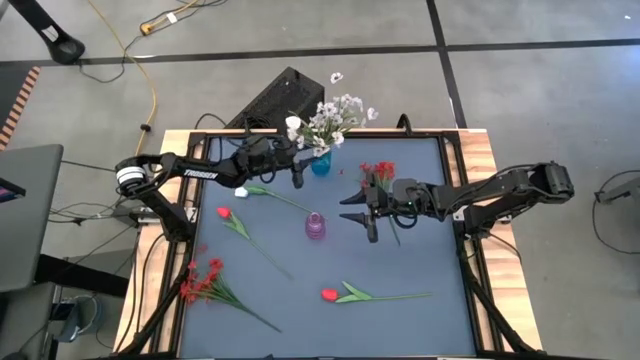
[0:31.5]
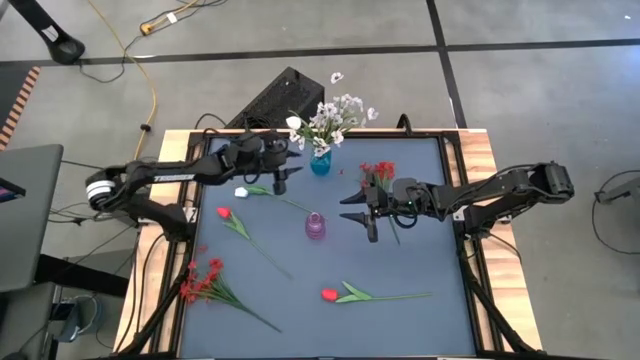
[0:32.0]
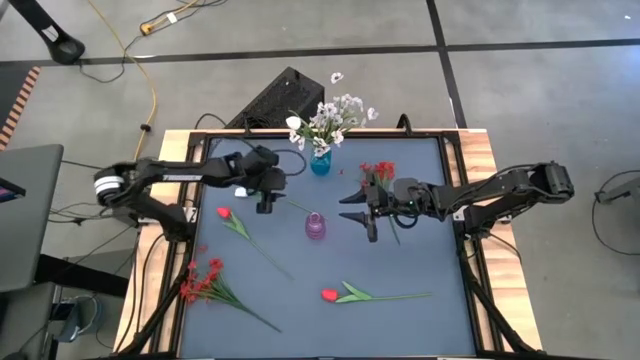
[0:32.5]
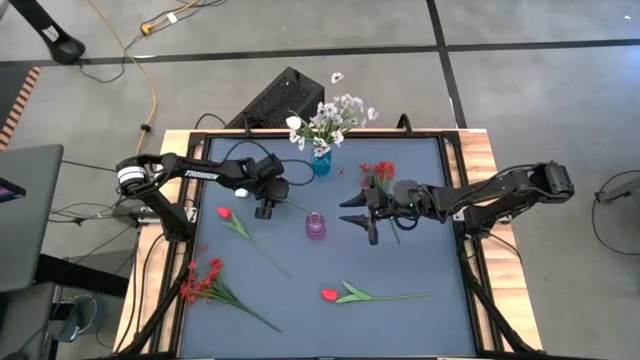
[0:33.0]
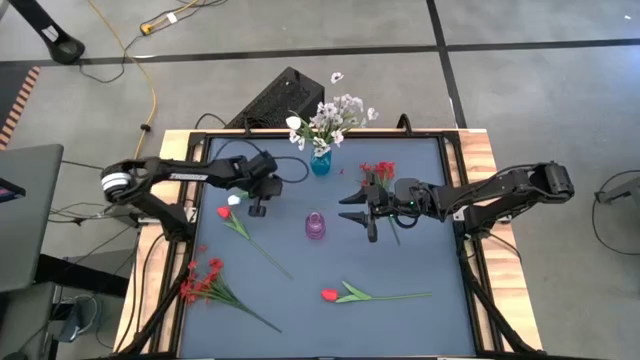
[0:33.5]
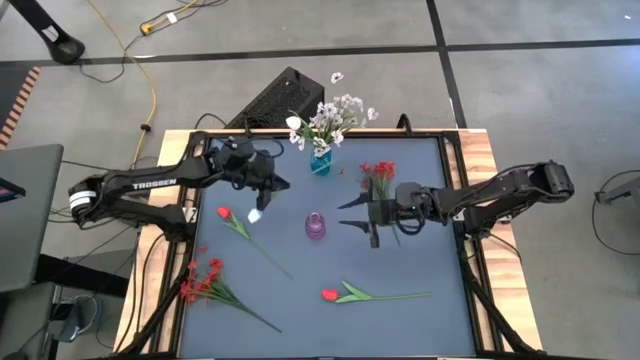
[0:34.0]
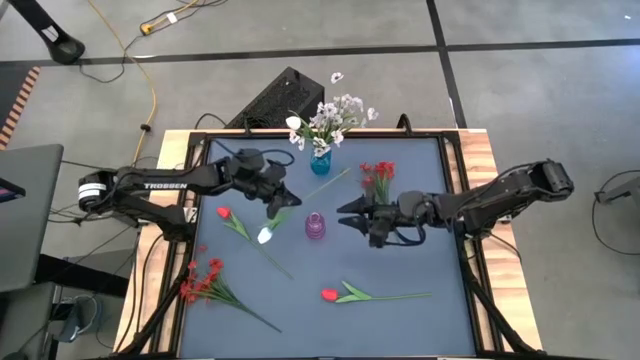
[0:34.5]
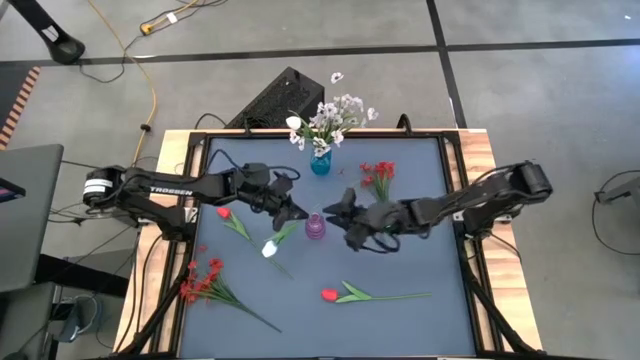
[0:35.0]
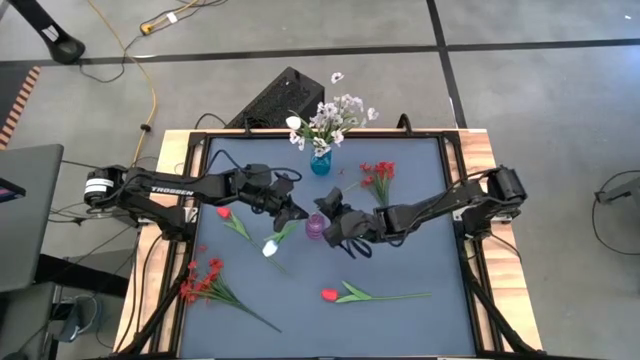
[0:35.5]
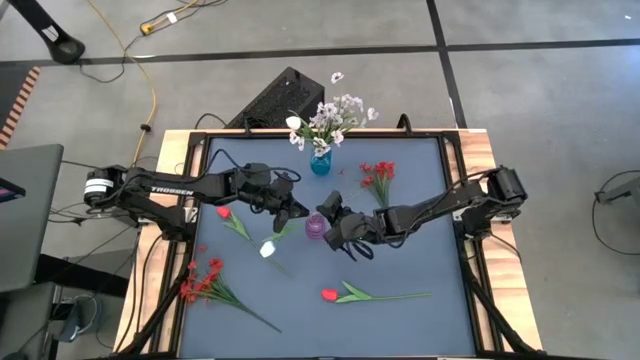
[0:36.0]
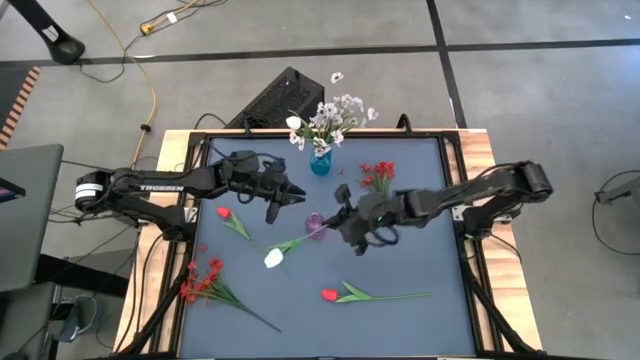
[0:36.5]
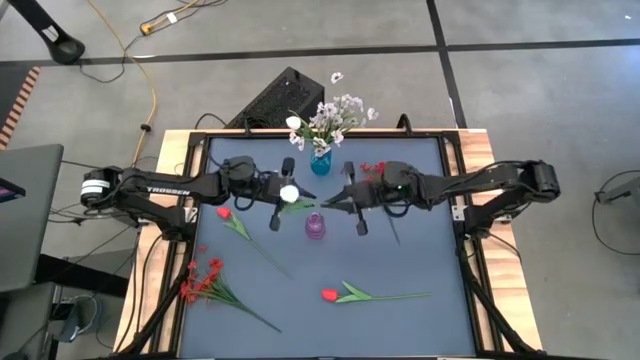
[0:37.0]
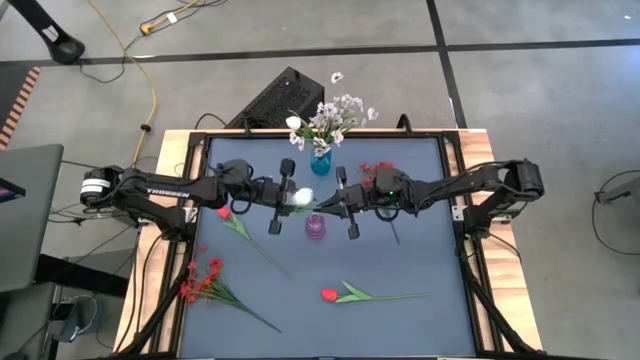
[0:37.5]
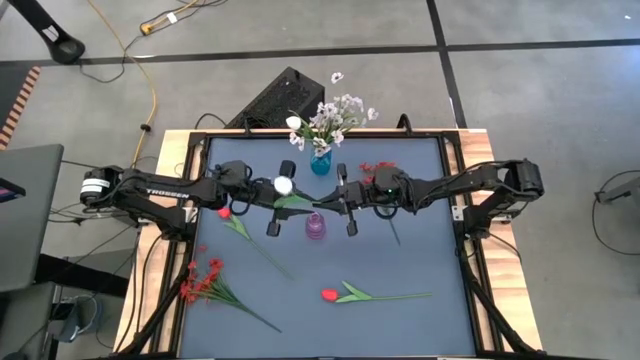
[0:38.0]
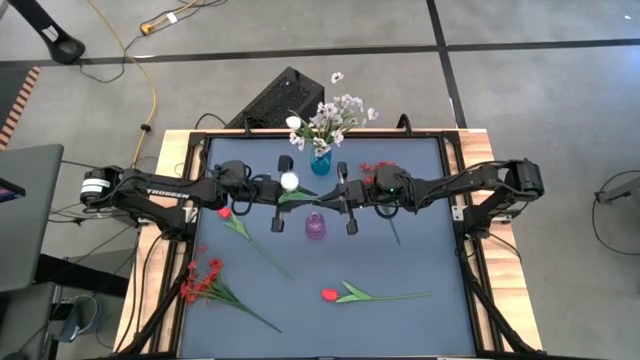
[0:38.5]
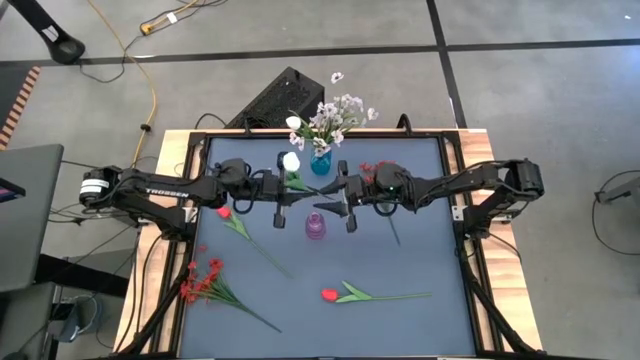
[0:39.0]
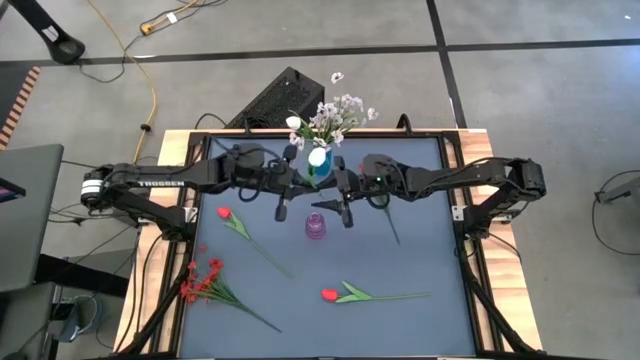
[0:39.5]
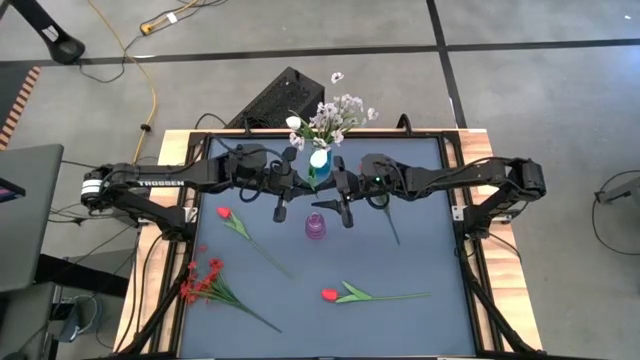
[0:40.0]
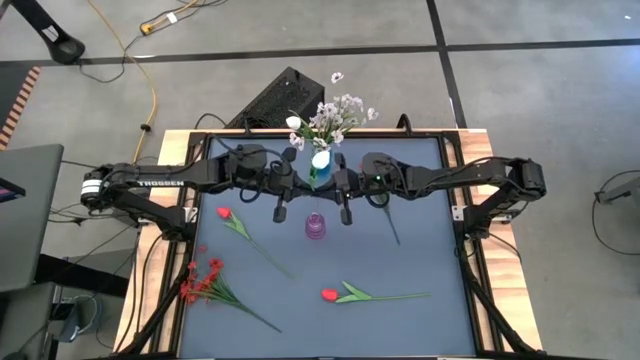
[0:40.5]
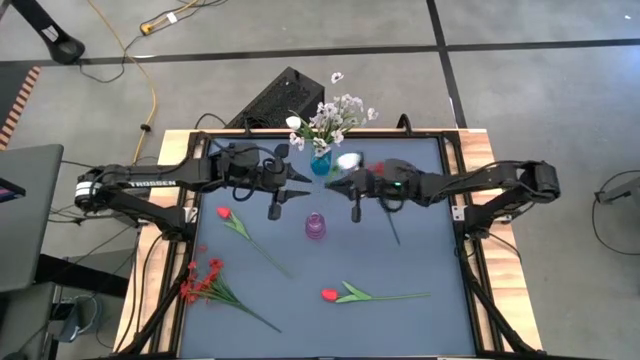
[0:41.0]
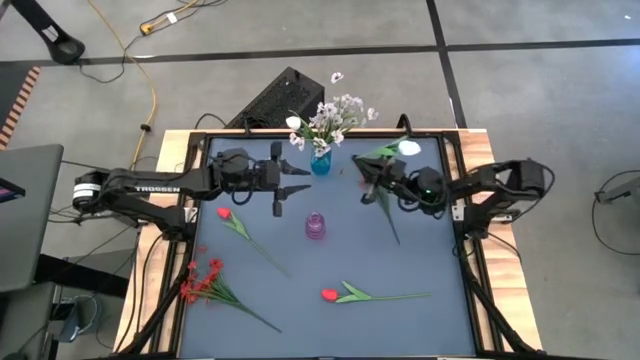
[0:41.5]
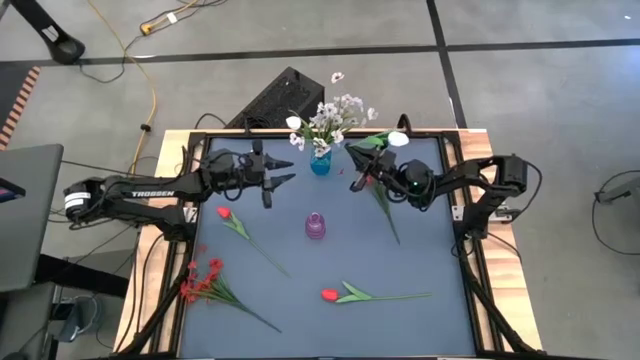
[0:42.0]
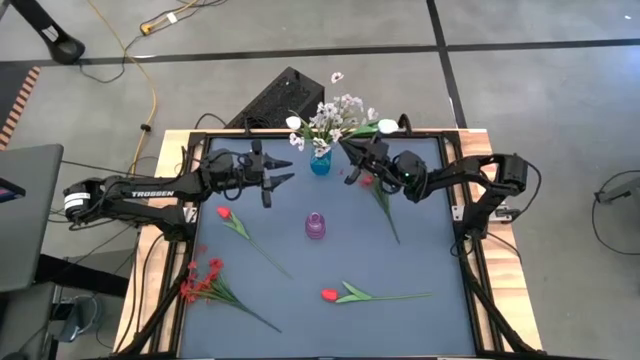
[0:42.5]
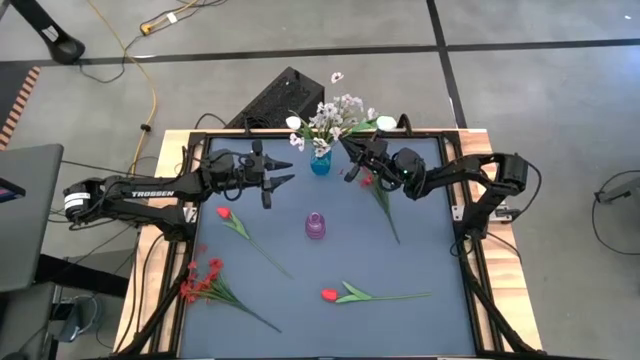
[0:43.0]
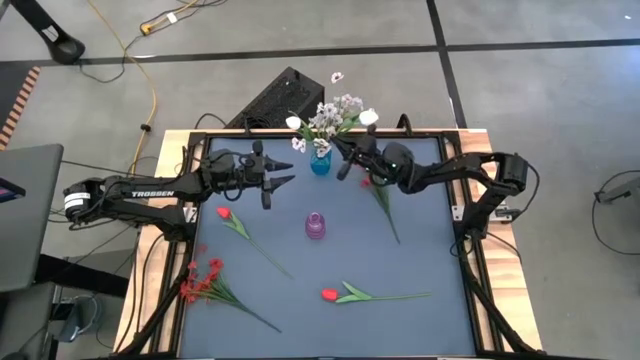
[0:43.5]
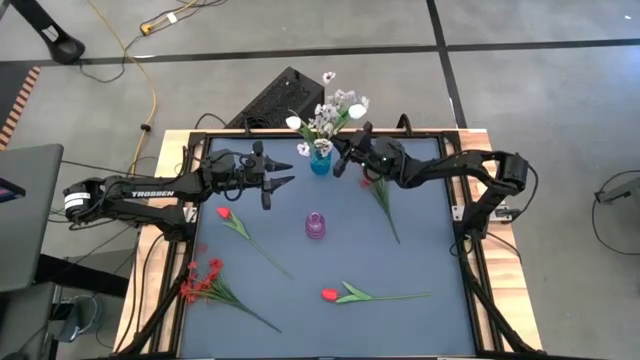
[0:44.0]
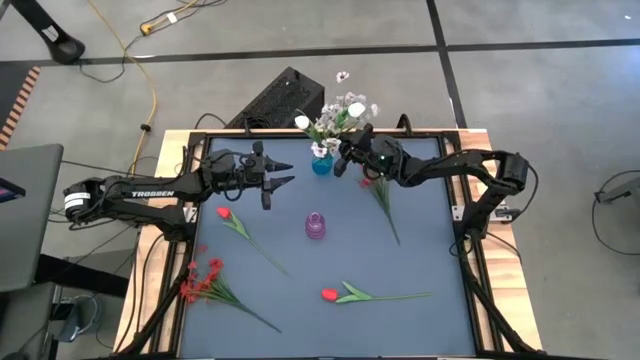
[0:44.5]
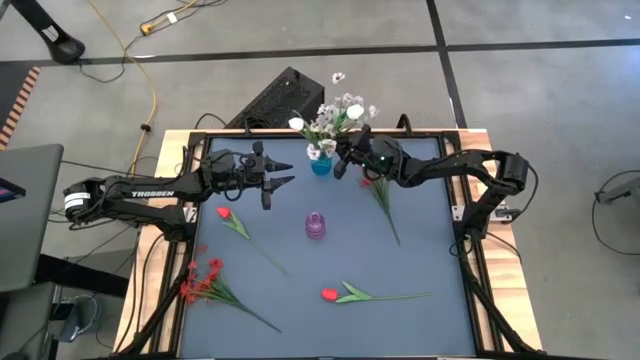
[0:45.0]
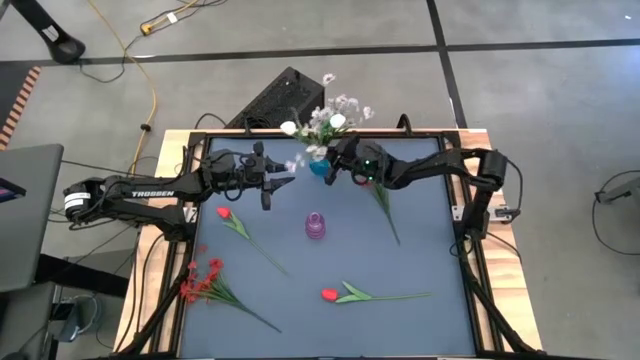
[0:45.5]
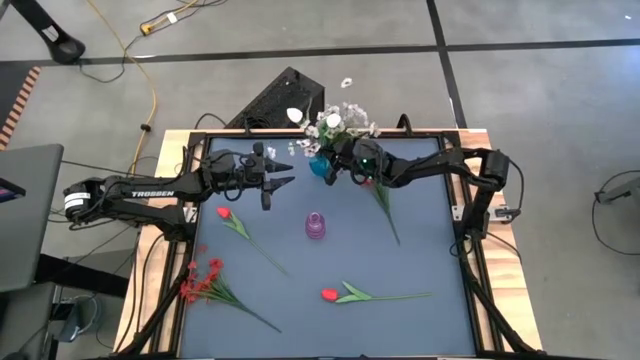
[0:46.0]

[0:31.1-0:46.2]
Task: Sort flowers into vase by color
Put the white tulip into the blue vase

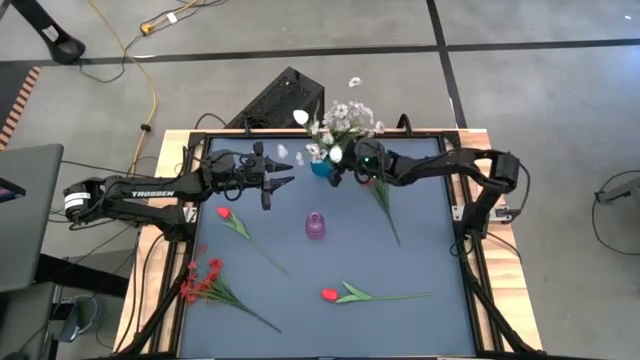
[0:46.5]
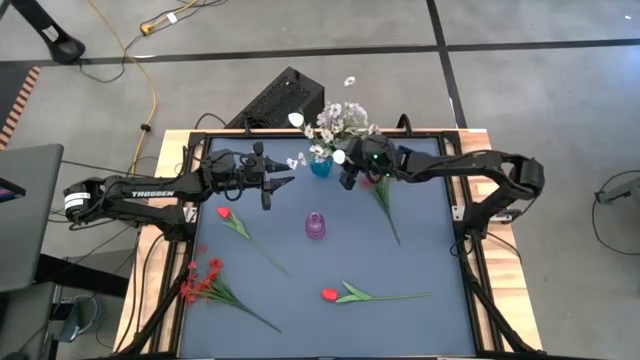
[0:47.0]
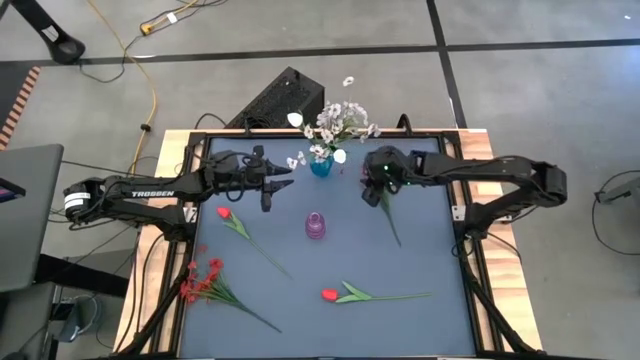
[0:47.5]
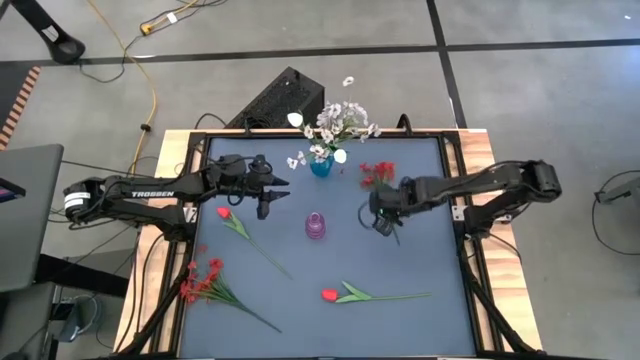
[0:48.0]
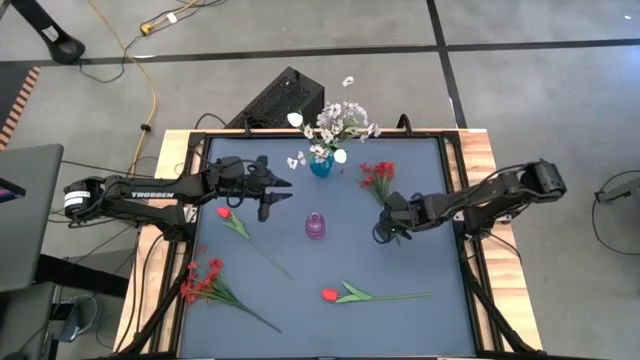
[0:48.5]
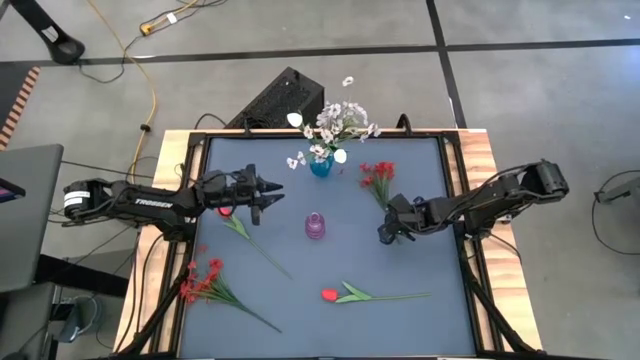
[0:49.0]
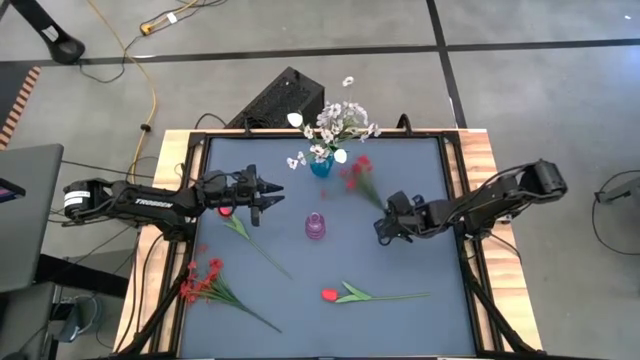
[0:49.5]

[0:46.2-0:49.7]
Put the top red flowers into the purple vase

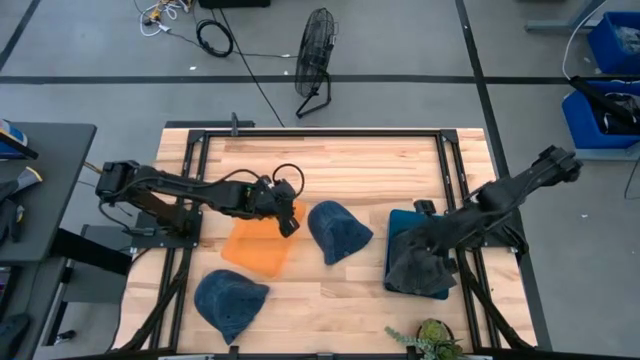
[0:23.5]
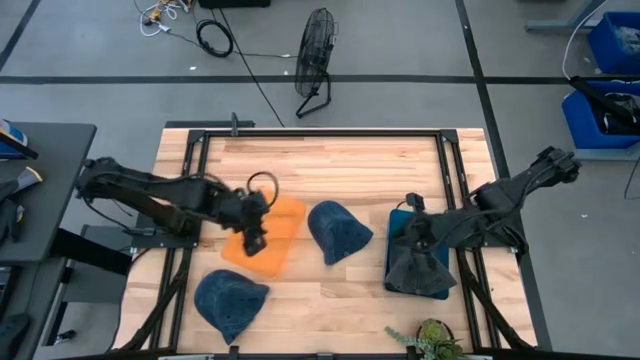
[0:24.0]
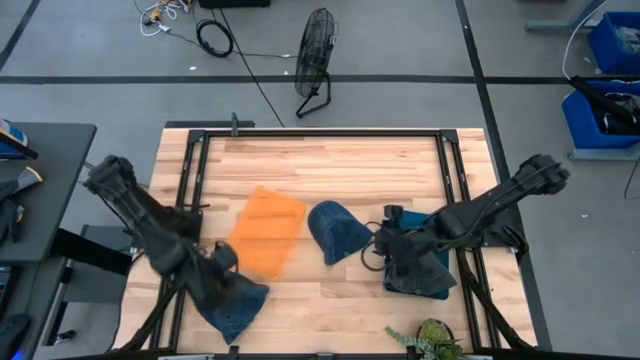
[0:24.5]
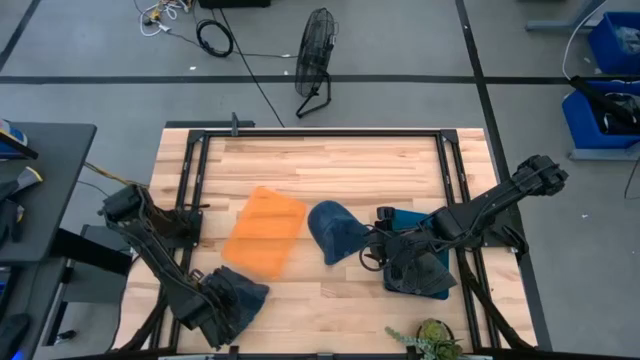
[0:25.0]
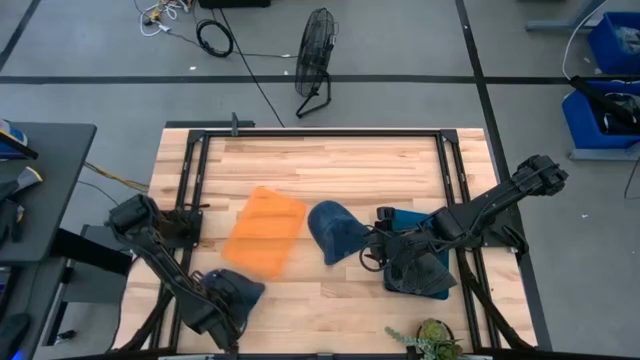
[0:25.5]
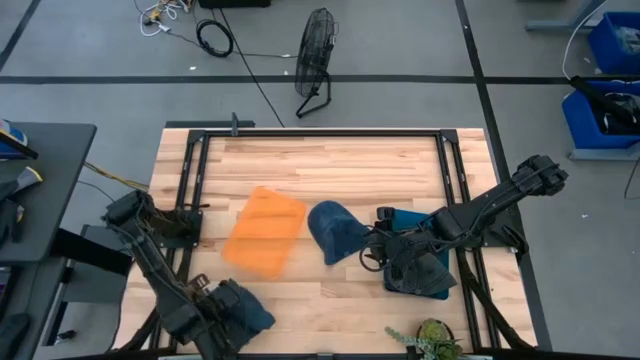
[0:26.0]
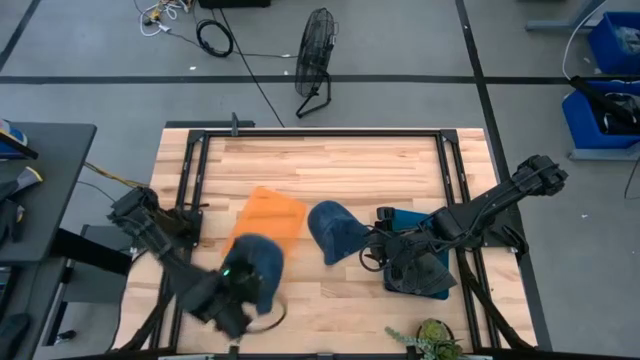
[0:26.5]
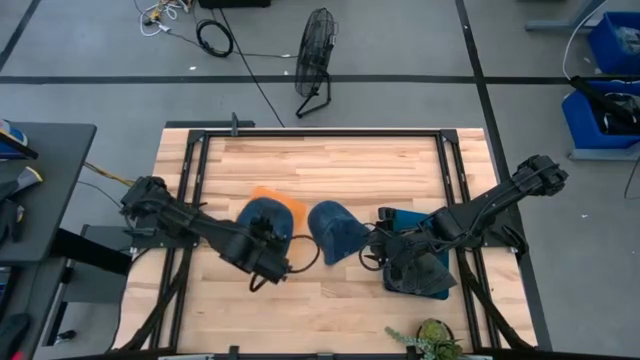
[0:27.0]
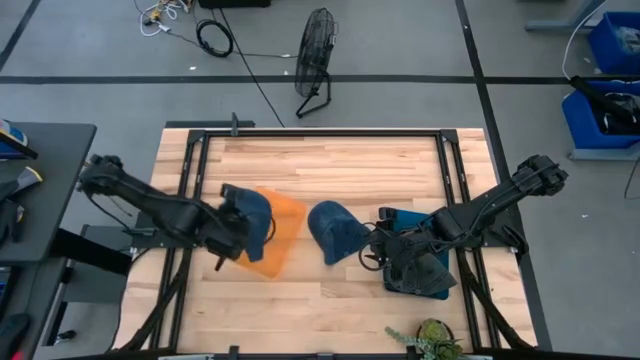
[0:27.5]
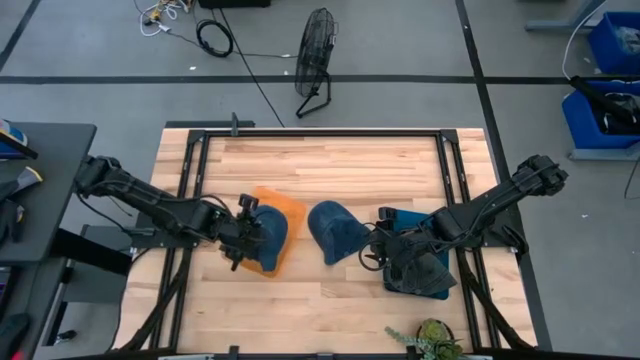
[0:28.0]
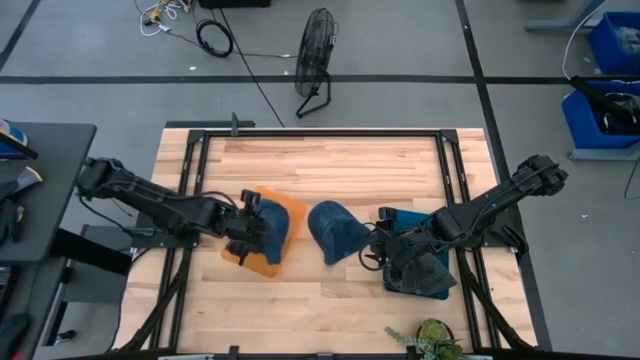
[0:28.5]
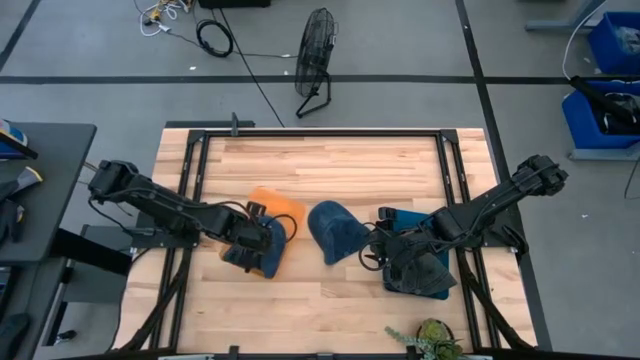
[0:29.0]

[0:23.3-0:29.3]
Task: Pick & Place hat
Put the bottom blue cap into the yellow bin
